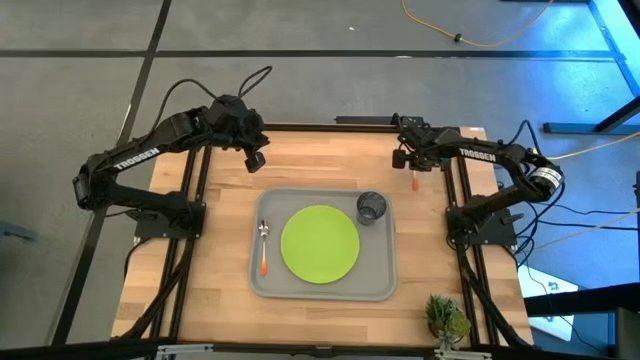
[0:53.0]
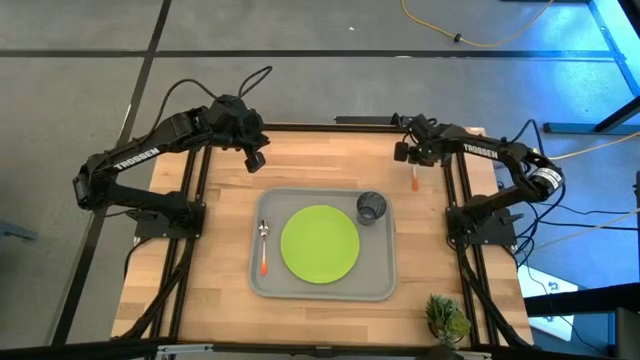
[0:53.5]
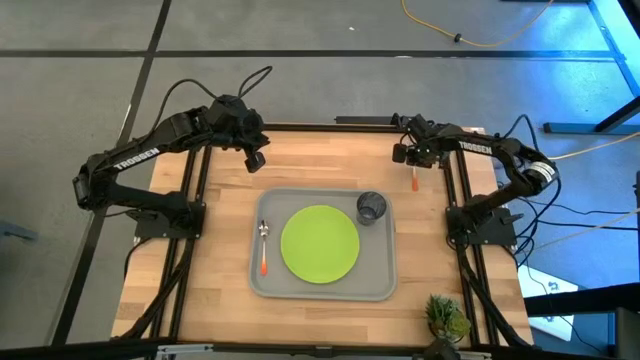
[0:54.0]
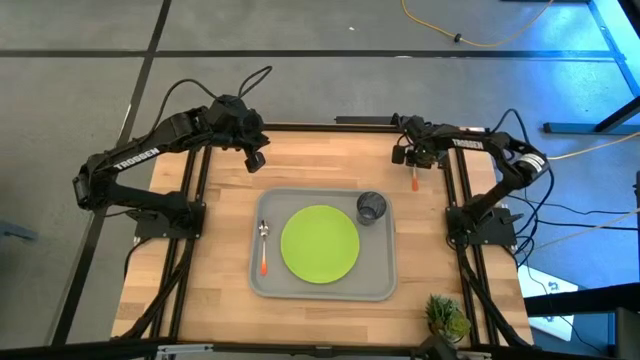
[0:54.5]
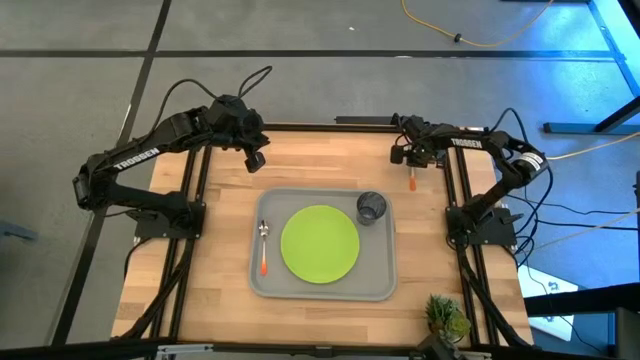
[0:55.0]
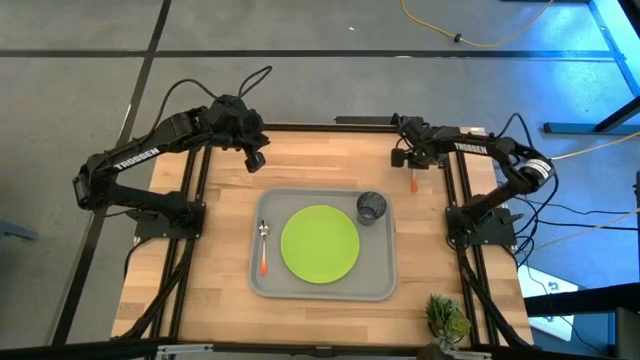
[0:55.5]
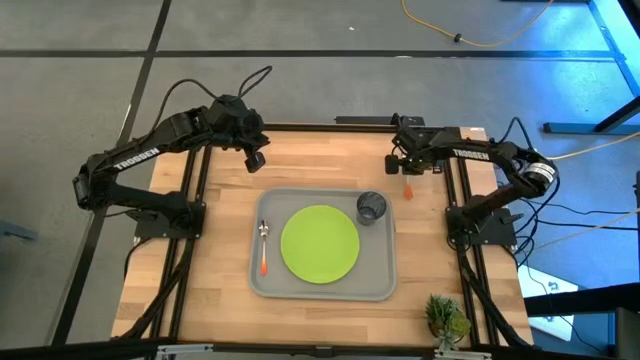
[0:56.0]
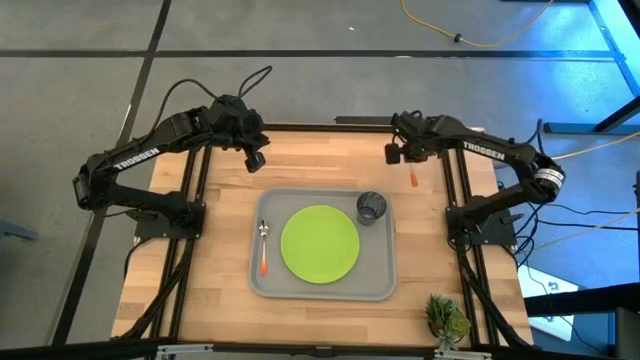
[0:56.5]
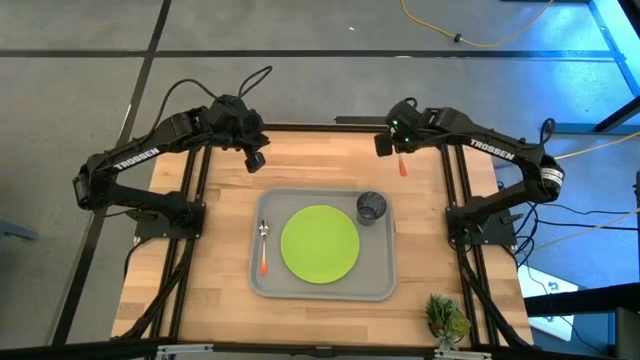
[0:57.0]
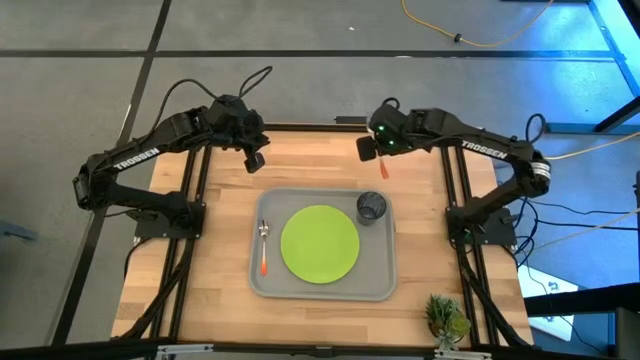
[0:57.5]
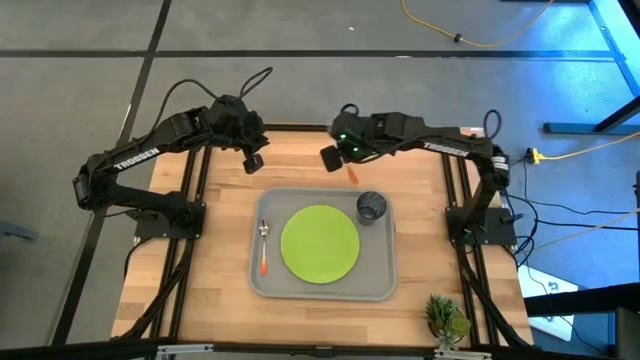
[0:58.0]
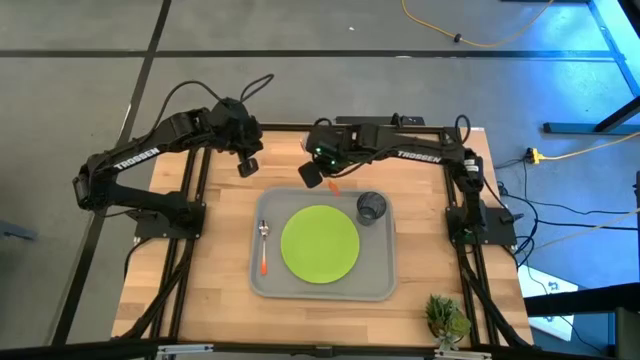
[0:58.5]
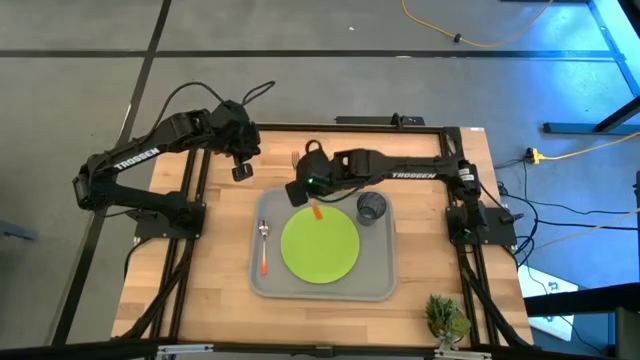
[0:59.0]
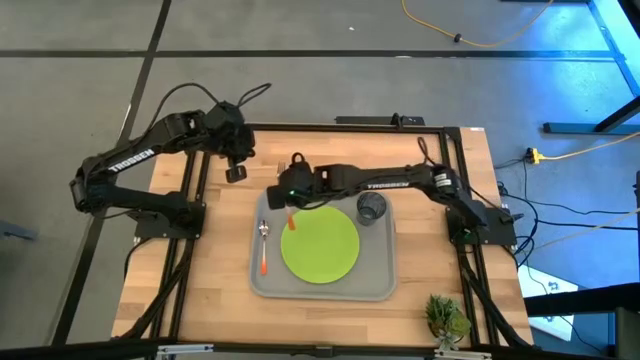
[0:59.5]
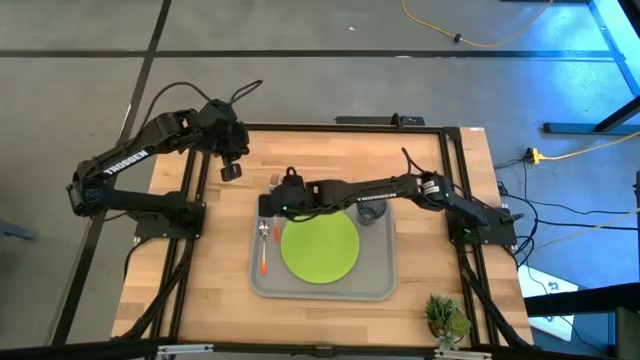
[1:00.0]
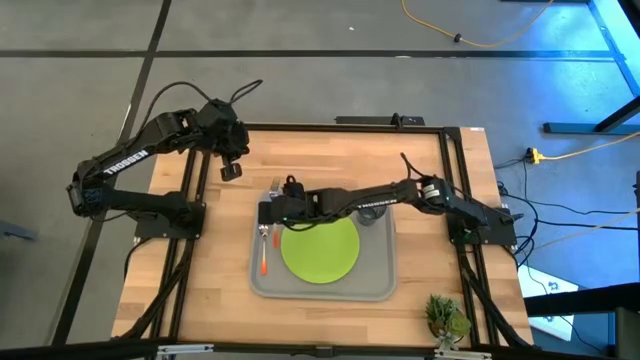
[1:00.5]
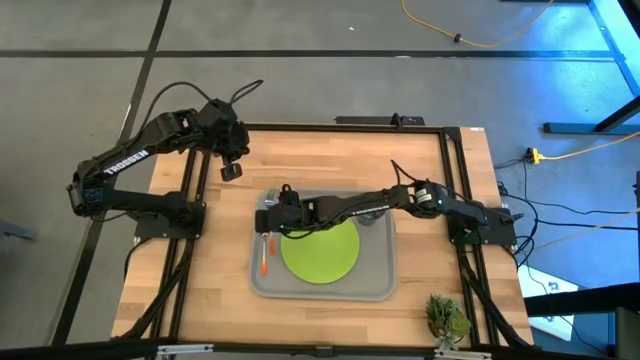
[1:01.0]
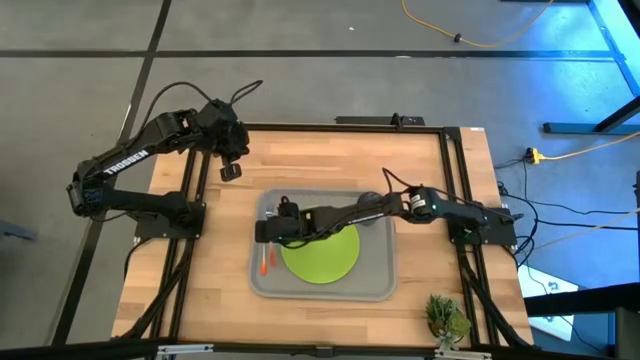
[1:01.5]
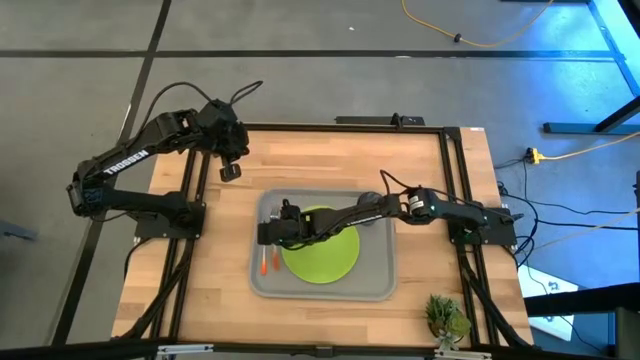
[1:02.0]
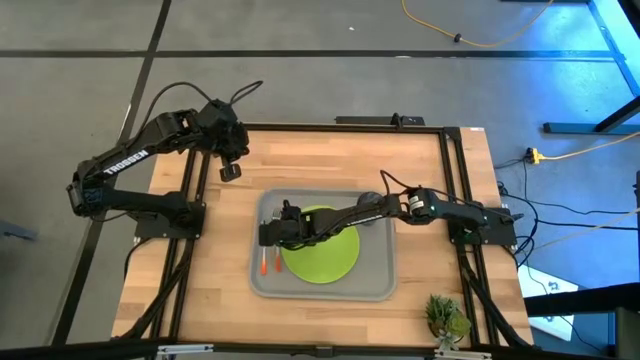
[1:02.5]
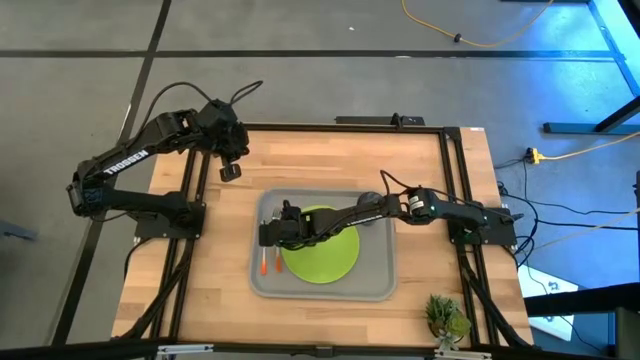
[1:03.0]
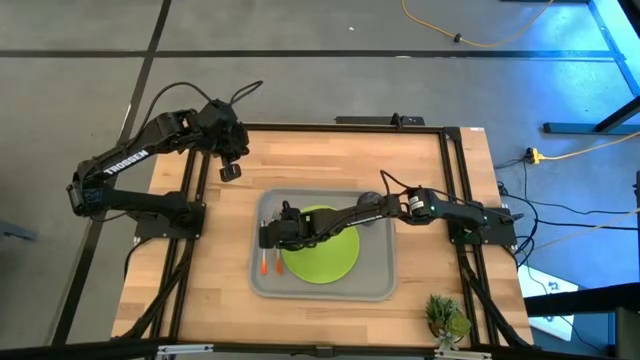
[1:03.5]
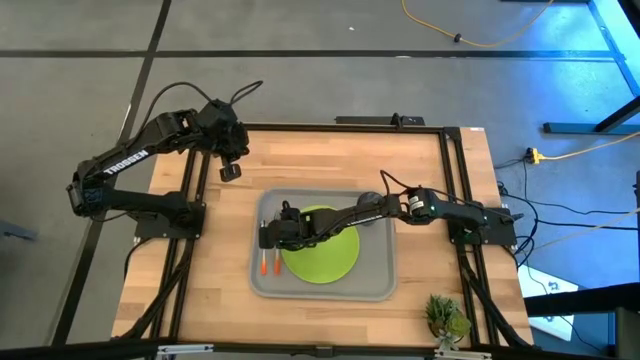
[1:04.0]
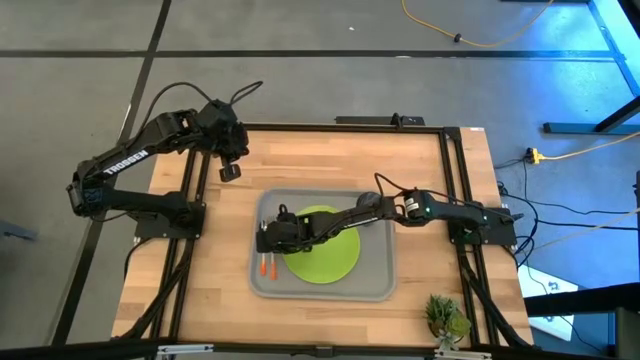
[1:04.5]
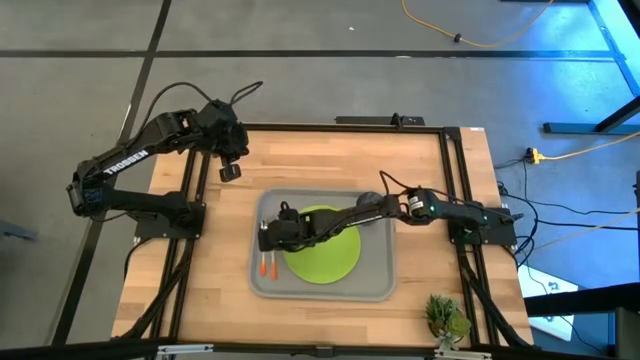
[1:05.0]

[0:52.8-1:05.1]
Task: Pick and place plate/cup/fork/spoon on tray
Put the fork on the gray tray between the green plate and orange spoon

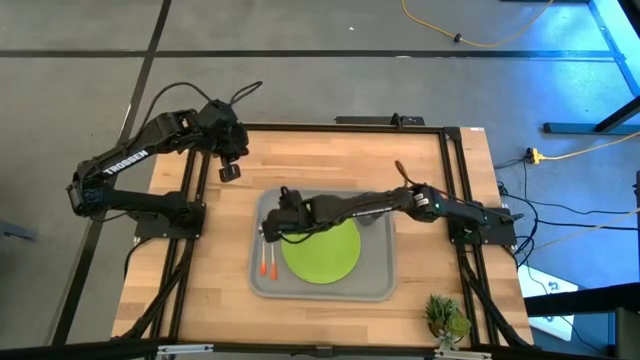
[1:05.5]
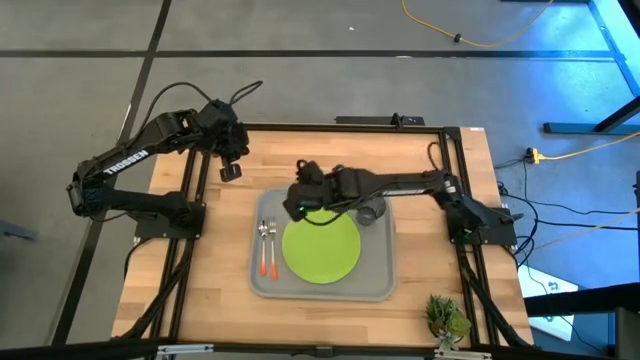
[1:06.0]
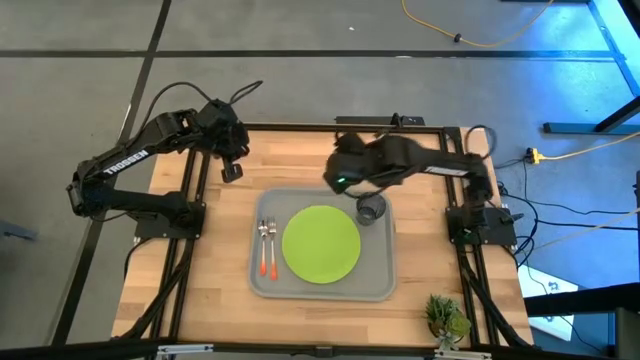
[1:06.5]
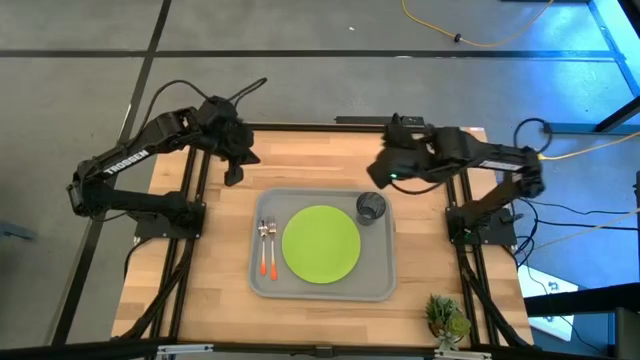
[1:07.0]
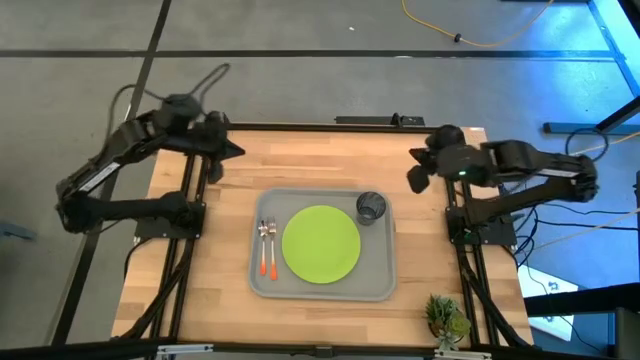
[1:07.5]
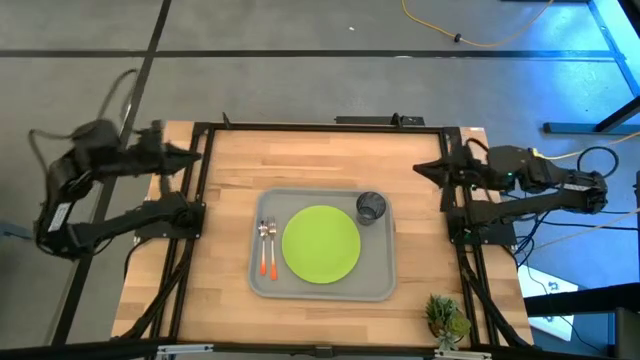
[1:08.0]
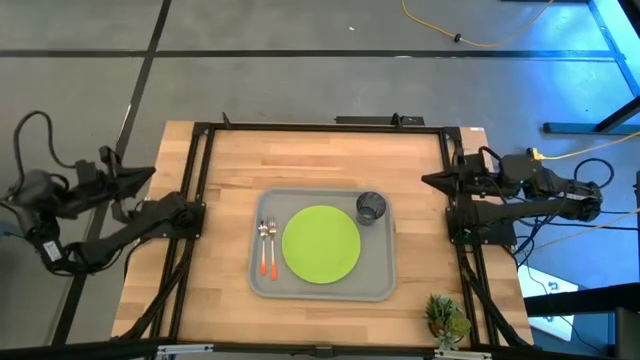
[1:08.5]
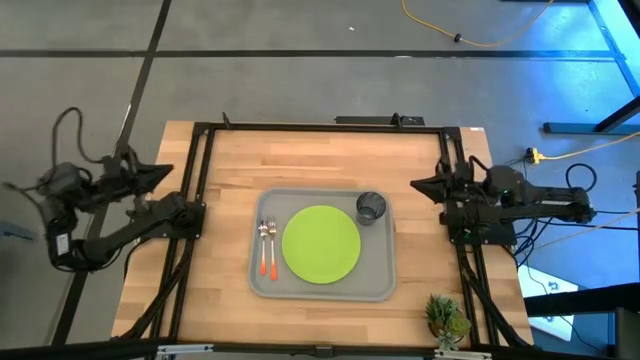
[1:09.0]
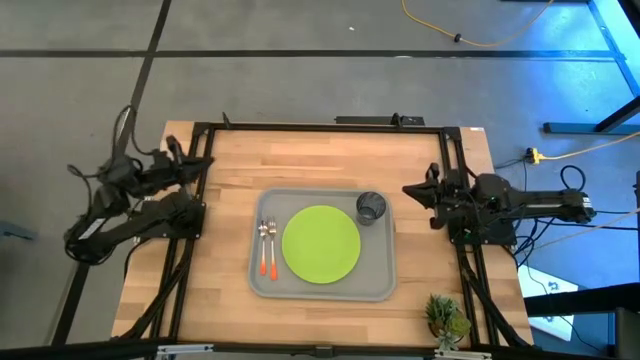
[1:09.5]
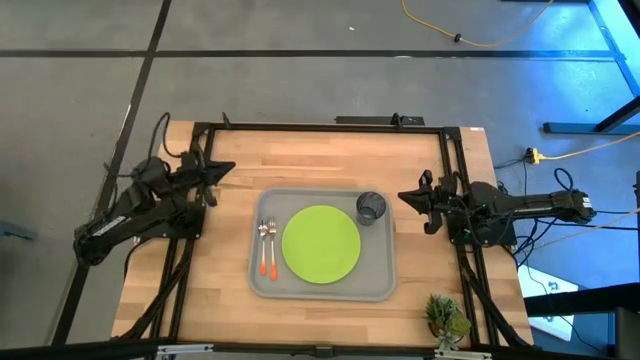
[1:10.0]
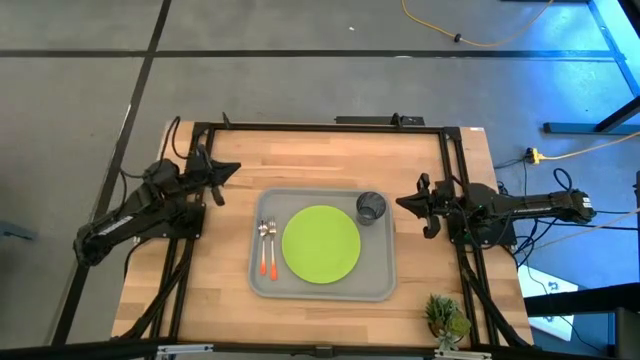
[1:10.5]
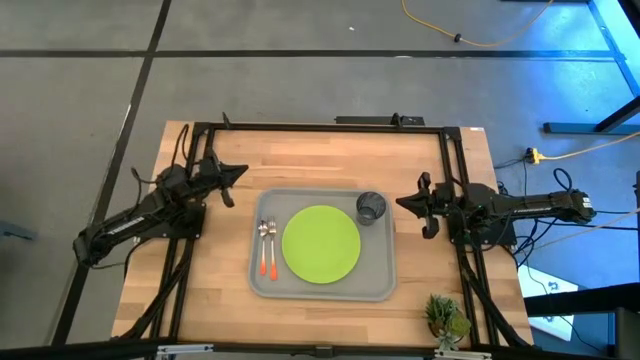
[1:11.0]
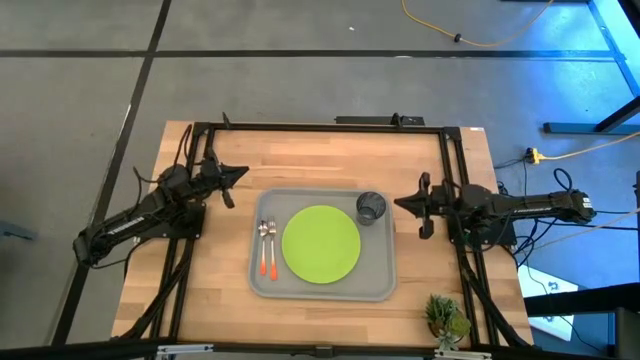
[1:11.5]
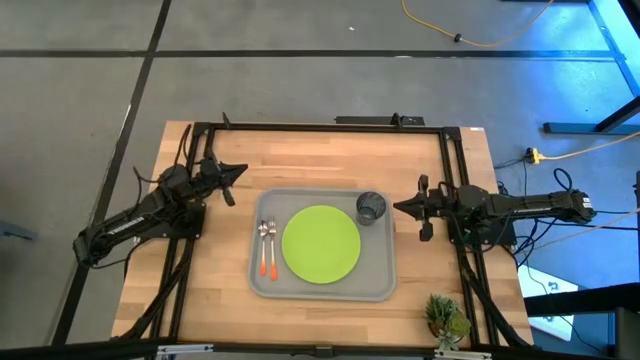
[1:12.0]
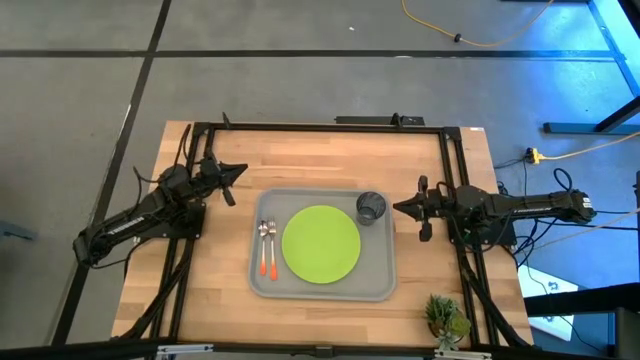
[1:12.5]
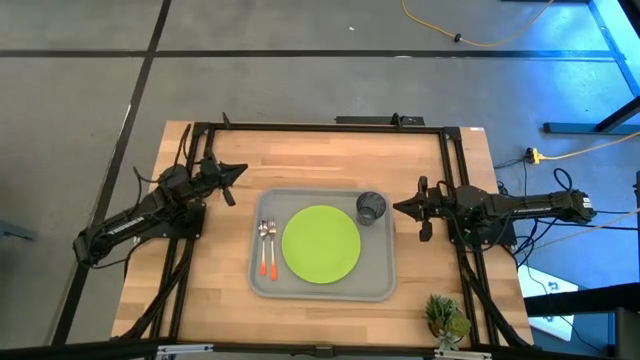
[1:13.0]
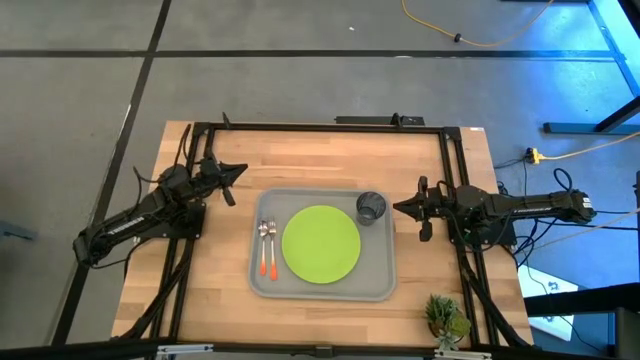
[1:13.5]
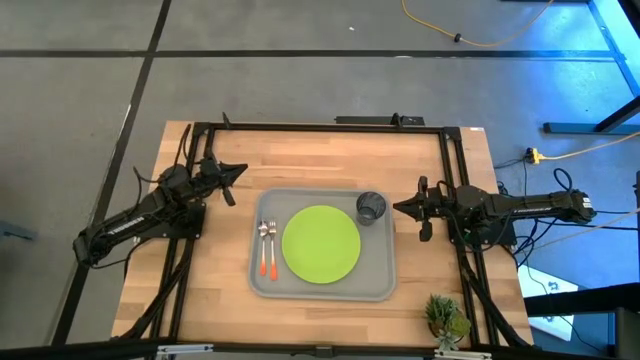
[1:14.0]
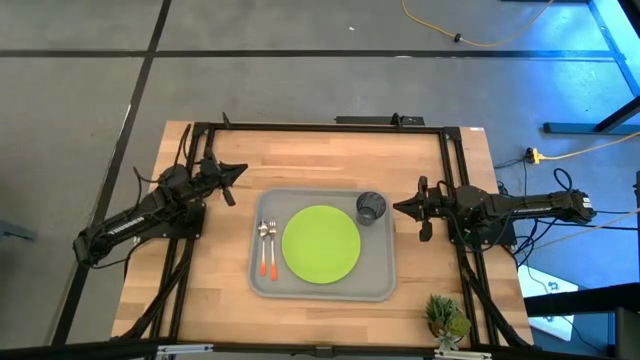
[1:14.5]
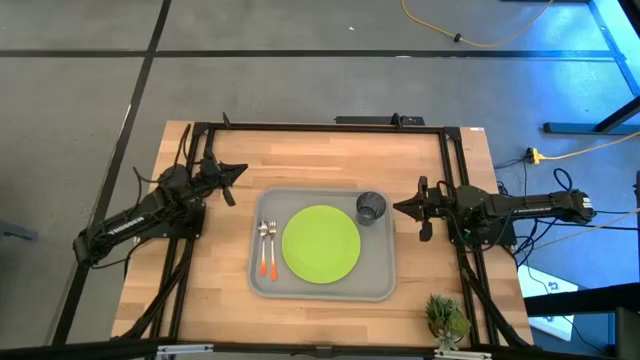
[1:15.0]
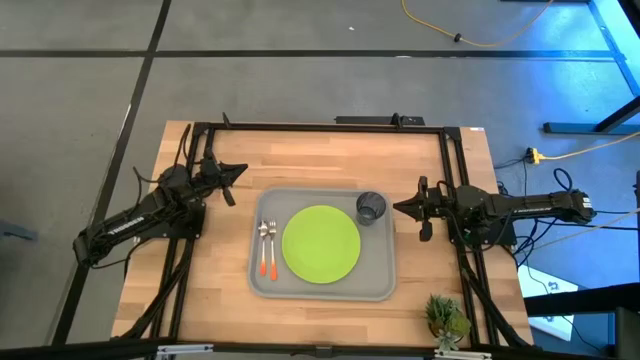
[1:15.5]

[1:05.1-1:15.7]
Return to Home Position
